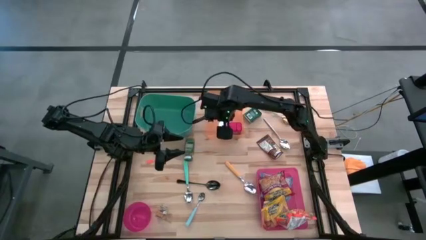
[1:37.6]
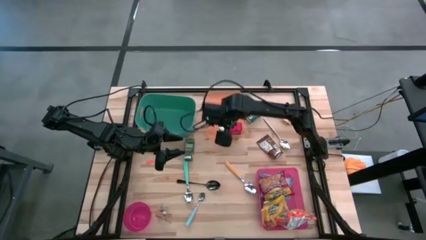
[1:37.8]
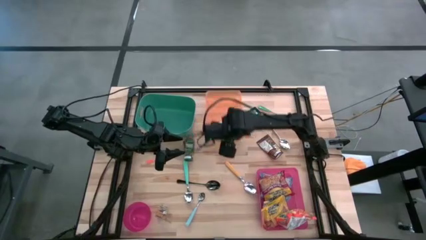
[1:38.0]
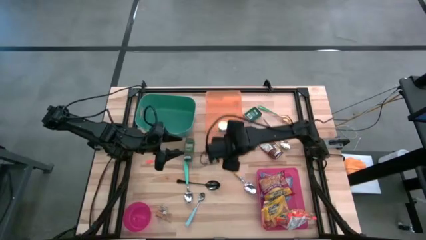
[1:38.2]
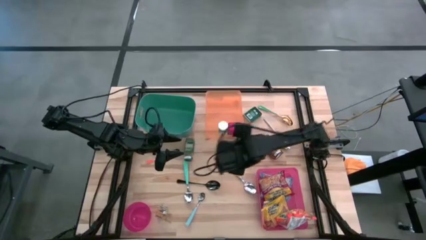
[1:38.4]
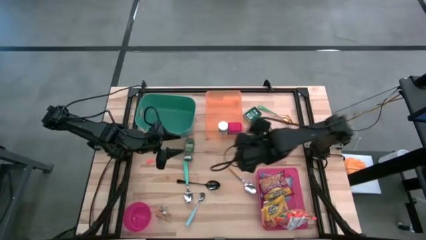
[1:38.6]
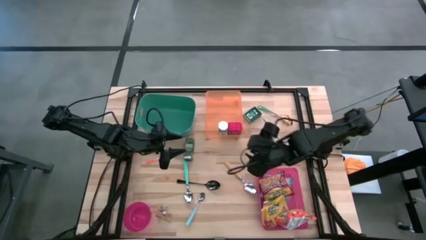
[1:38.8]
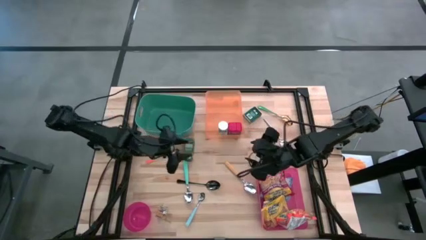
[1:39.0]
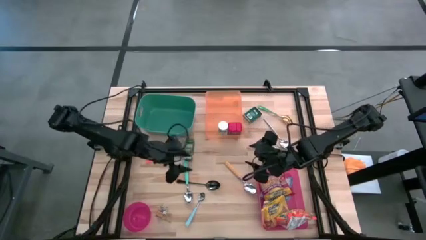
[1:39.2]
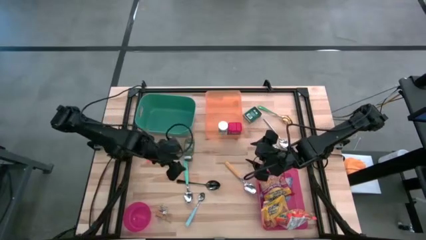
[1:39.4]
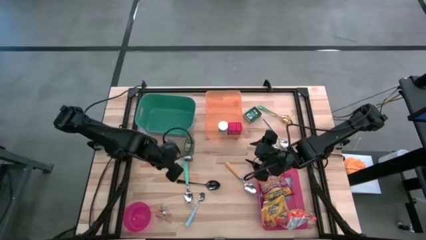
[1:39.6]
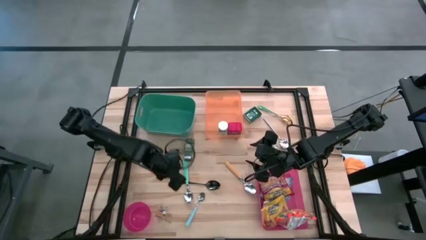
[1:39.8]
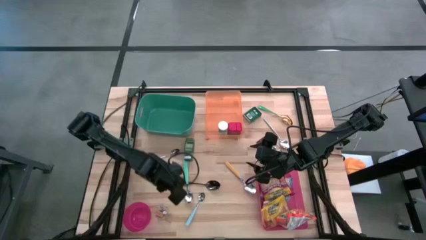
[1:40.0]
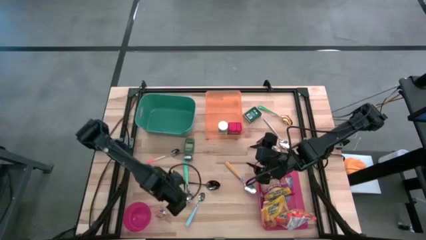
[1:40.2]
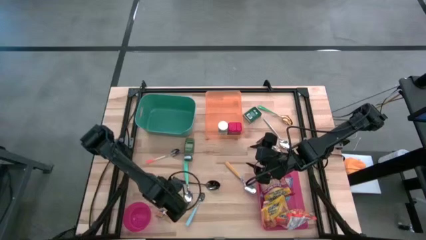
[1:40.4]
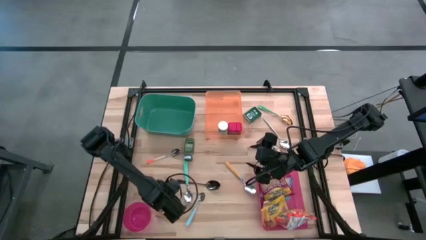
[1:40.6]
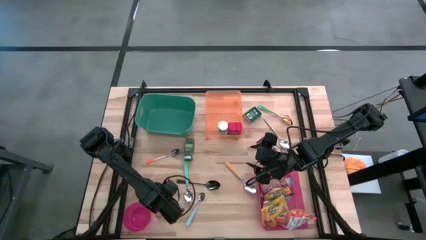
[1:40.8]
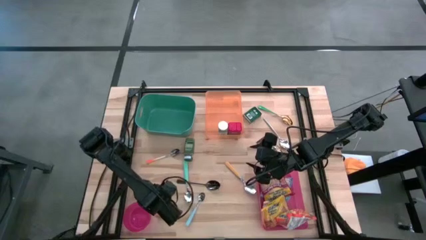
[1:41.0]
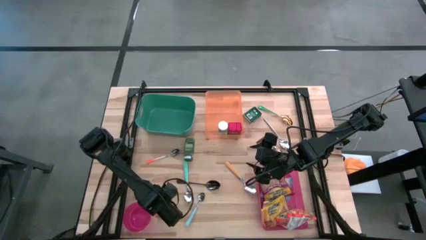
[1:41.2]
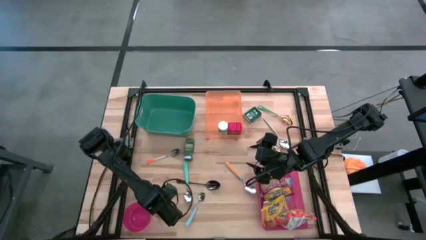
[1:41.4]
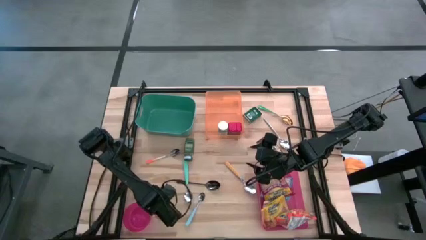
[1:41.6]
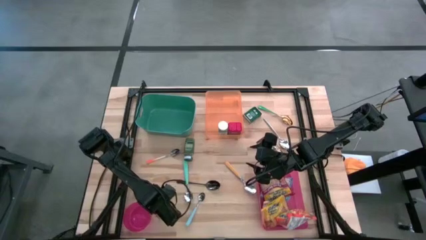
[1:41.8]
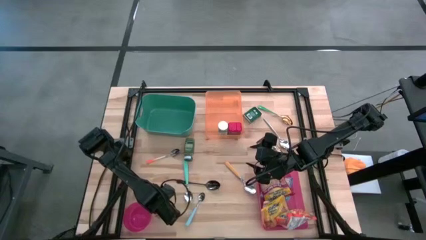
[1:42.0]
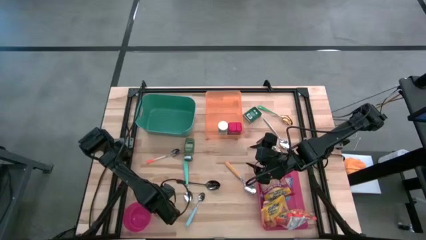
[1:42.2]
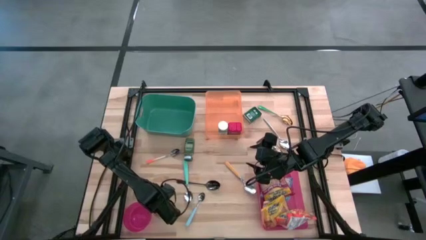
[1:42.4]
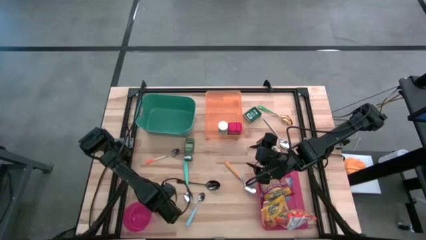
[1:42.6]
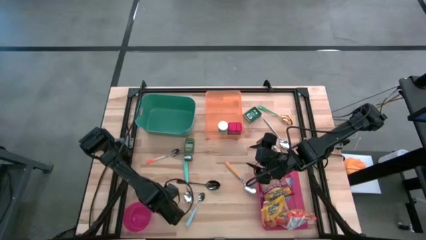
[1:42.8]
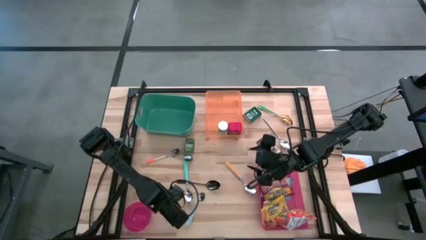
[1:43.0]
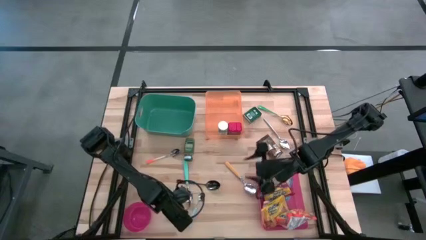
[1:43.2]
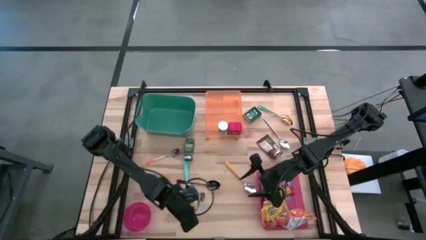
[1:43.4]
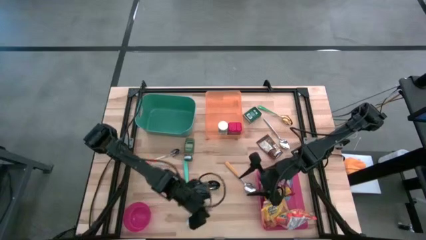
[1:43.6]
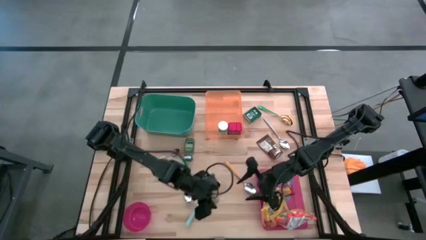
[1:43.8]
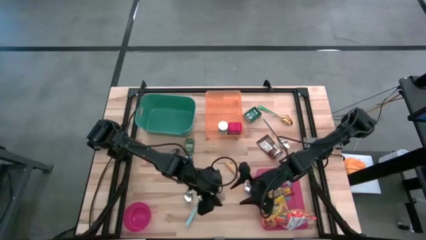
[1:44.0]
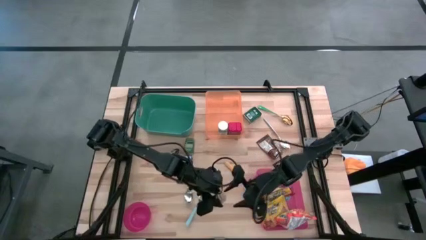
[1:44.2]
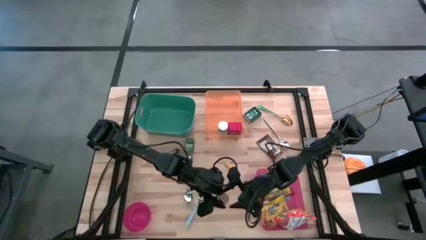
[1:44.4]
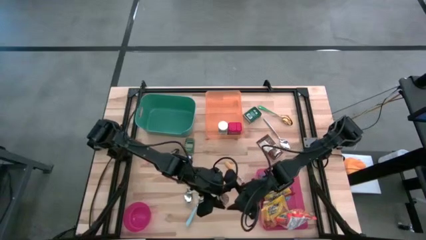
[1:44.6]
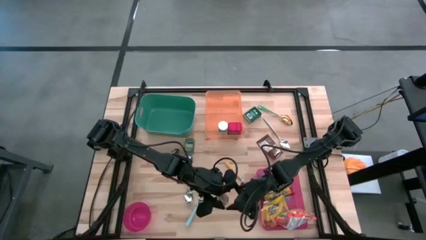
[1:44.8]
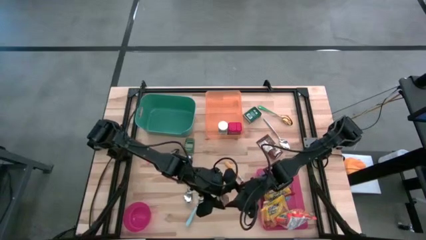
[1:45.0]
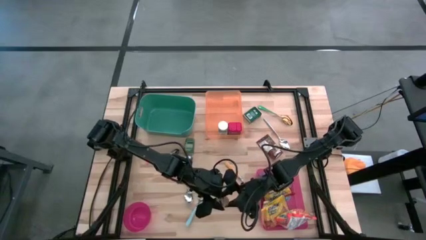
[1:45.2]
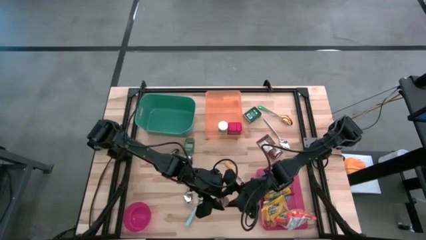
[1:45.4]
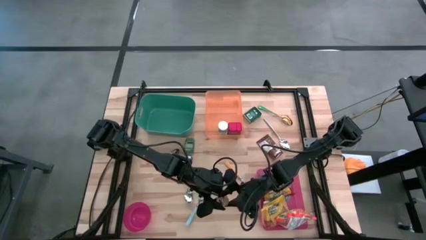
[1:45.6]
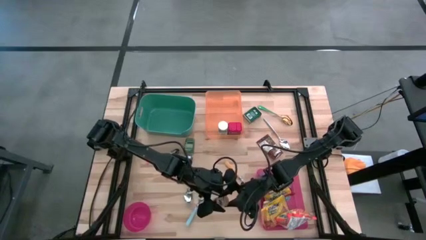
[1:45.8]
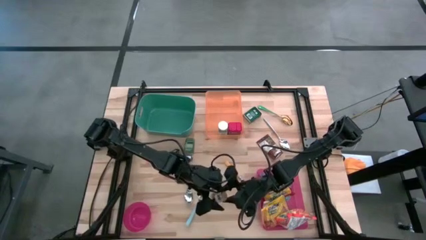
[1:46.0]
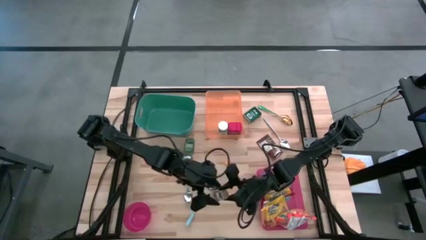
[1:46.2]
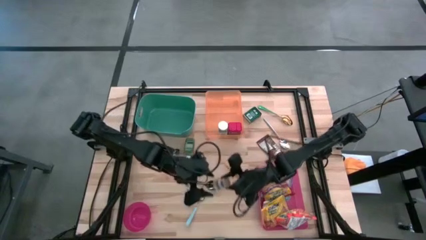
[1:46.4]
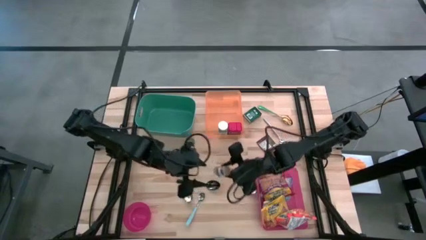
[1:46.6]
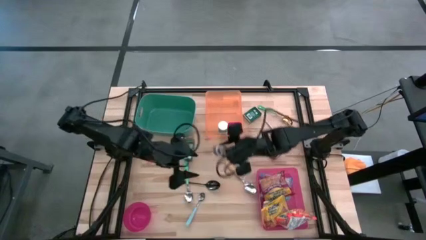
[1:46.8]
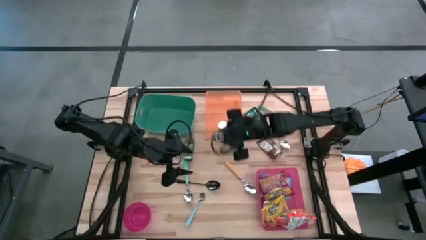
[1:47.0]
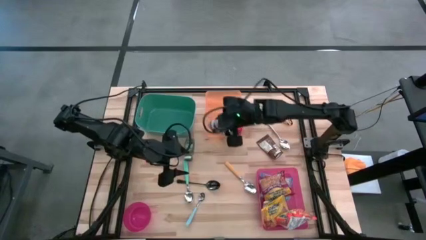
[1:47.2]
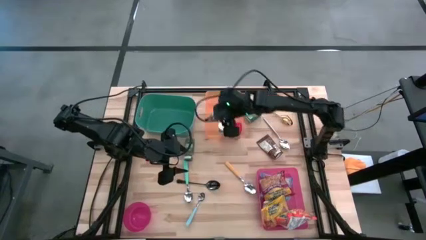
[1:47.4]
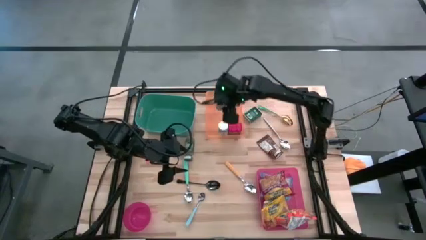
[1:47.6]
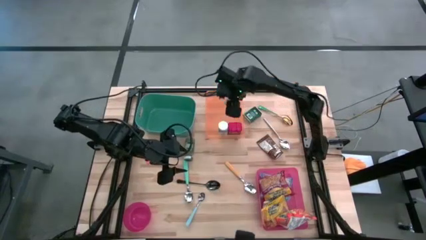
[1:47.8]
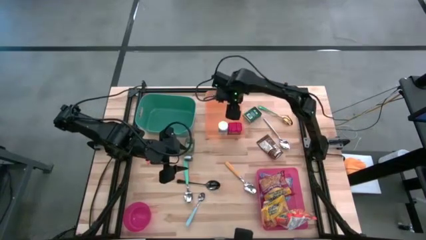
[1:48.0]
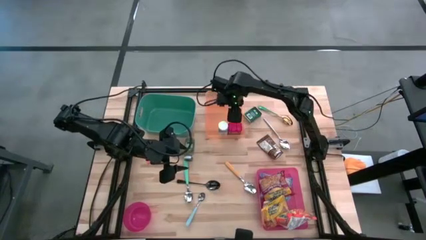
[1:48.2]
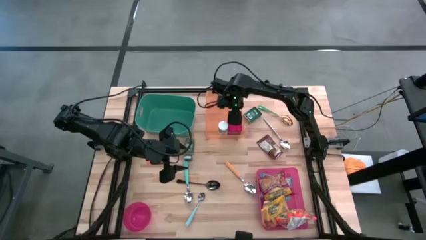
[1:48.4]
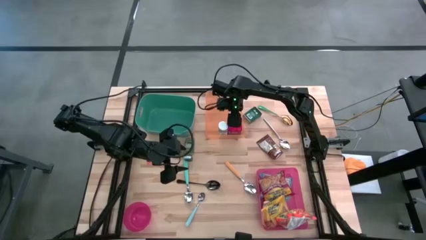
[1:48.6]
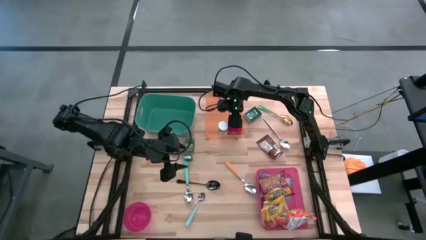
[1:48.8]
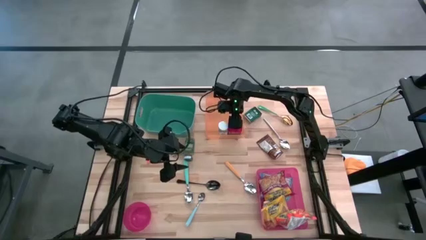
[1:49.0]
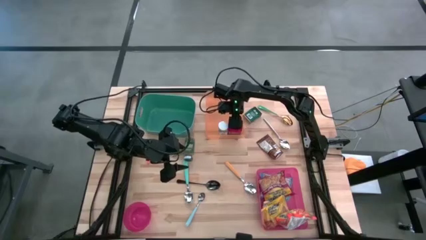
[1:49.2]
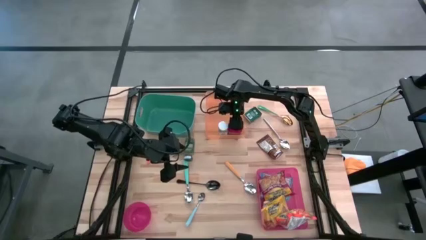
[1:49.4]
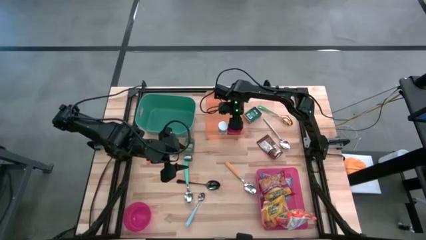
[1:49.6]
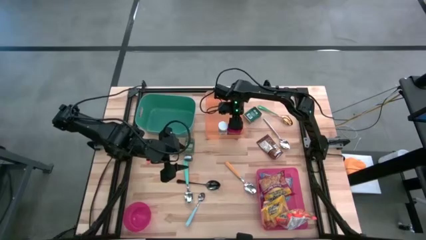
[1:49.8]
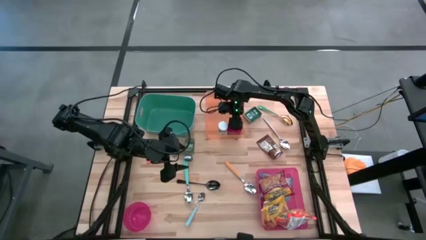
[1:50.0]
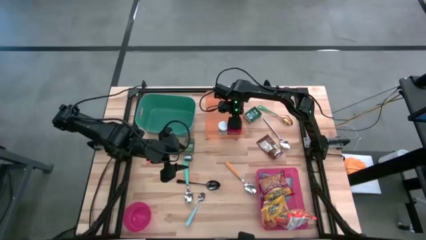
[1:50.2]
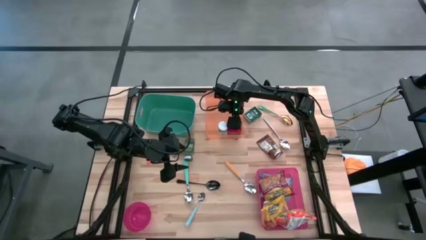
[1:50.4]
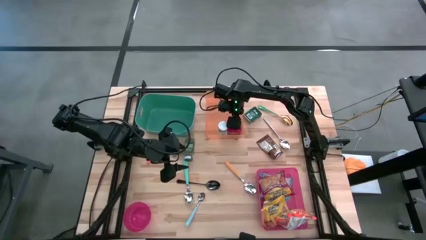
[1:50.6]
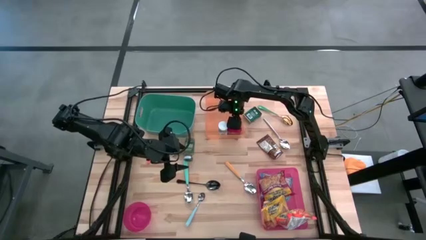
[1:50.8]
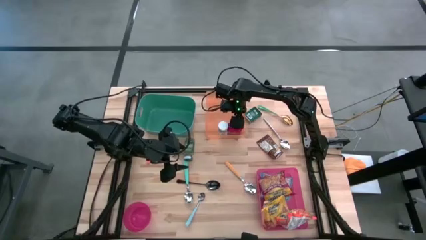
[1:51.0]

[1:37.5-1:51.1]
Put the brown seasoning bottle into the orange bin

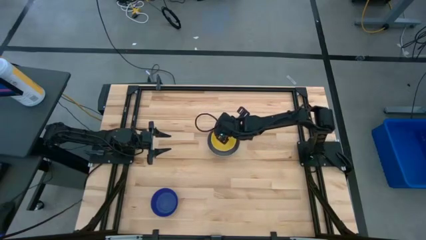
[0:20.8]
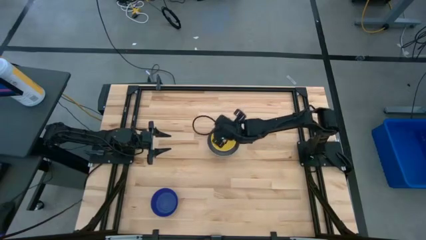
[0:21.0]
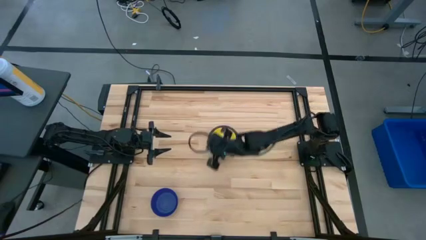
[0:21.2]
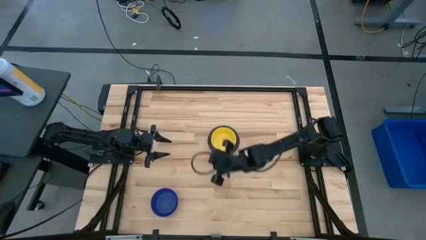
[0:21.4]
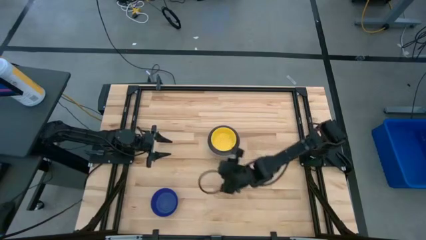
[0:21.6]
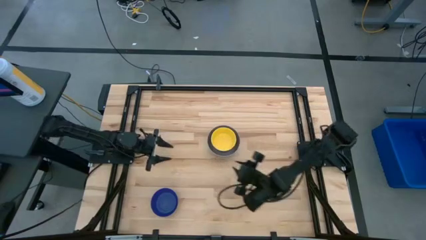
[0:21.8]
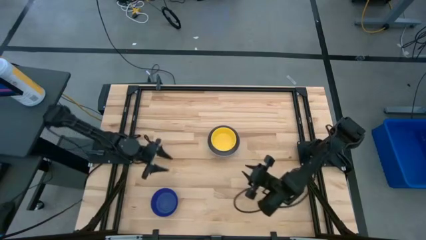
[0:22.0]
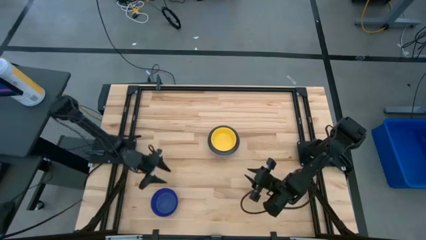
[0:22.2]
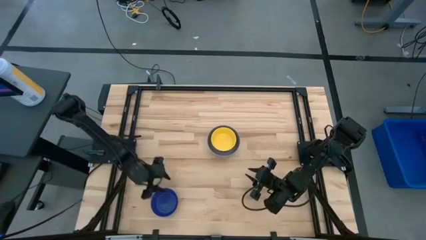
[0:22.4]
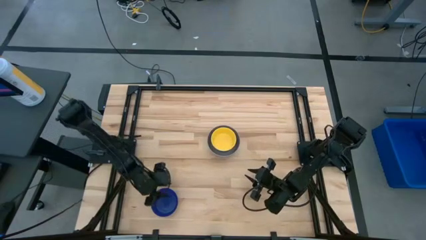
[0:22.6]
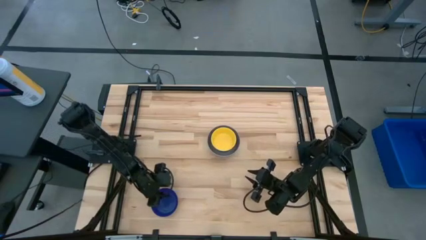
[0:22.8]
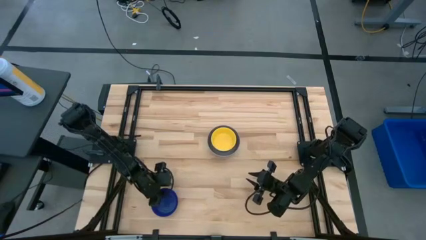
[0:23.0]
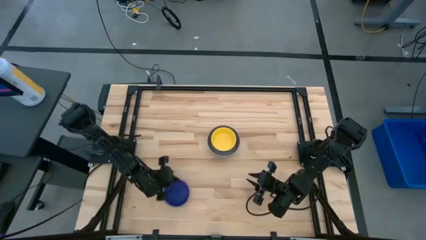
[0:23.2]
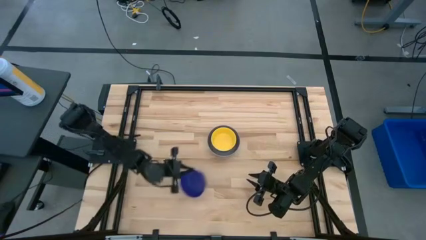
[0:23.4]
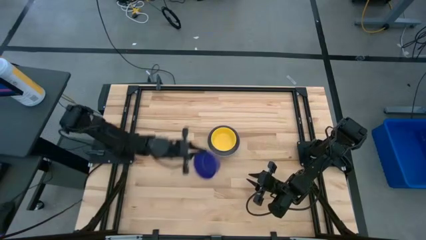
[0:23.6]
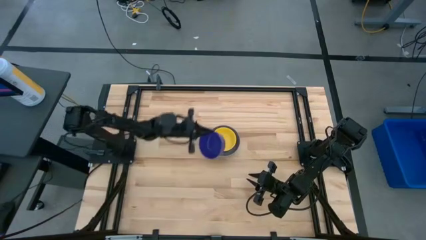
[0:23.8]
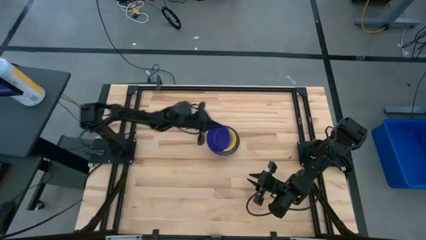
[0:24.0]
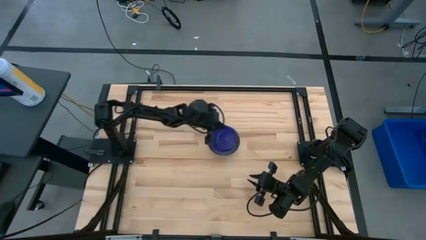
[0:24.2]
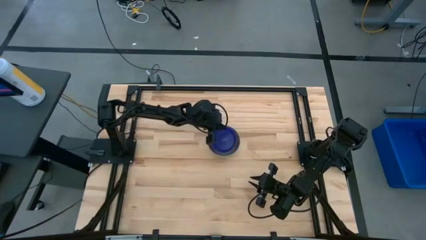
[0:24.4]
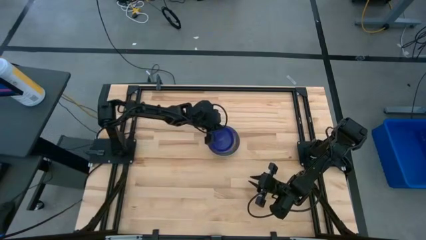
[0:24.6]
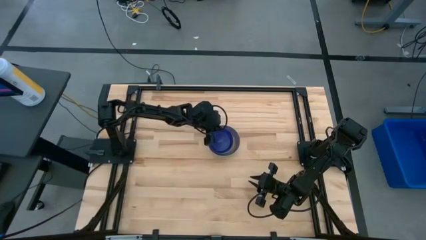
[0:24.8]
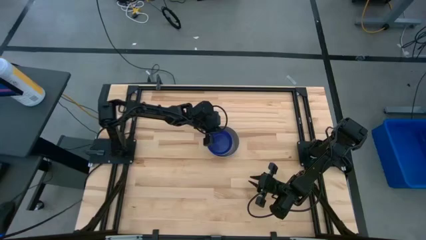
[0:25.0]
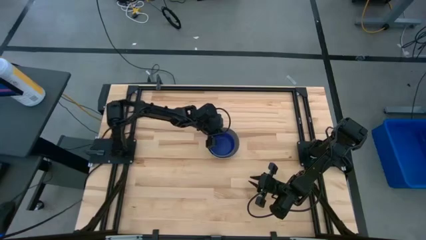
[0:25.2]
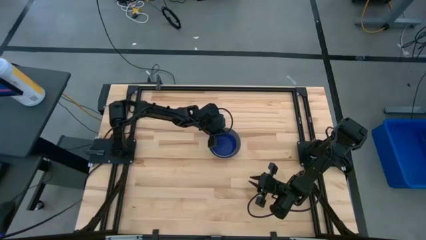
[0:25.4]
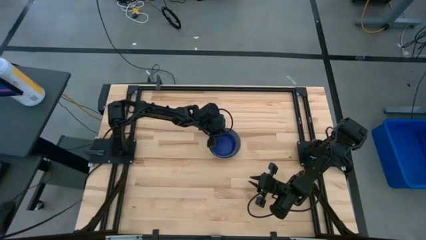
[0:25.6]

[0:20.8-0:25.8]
Stack the dark blue bowl on top of the blue bowl
